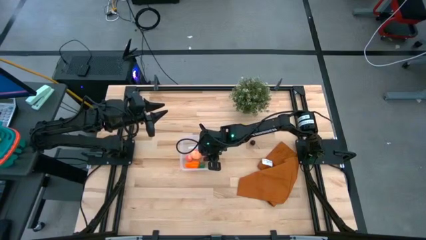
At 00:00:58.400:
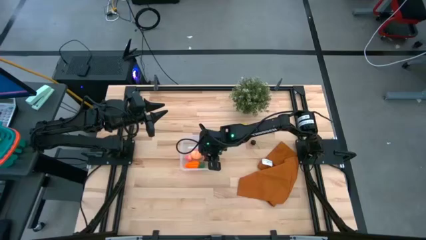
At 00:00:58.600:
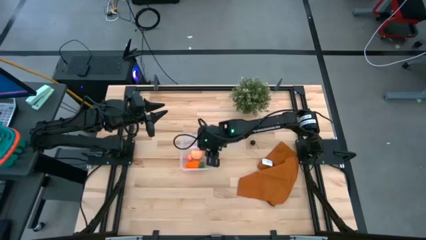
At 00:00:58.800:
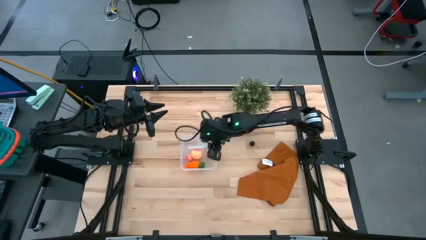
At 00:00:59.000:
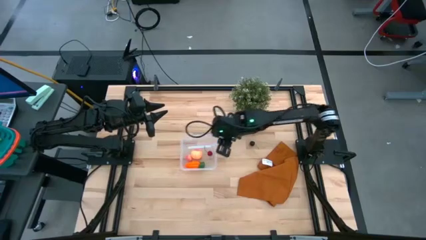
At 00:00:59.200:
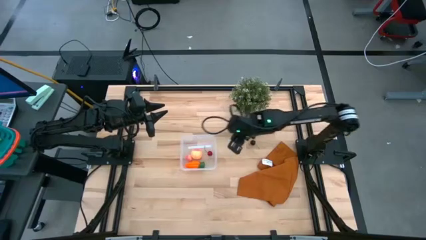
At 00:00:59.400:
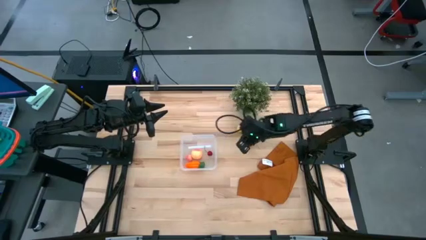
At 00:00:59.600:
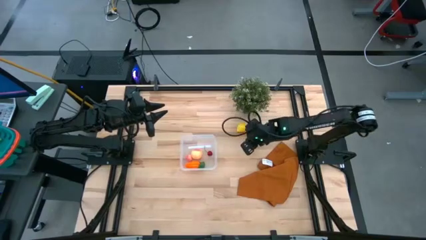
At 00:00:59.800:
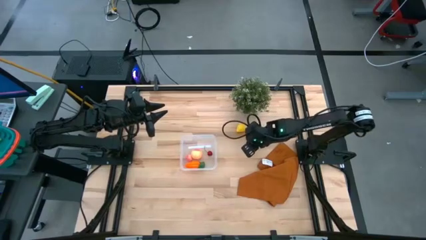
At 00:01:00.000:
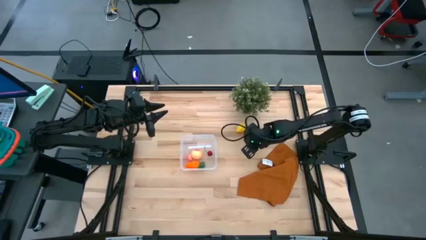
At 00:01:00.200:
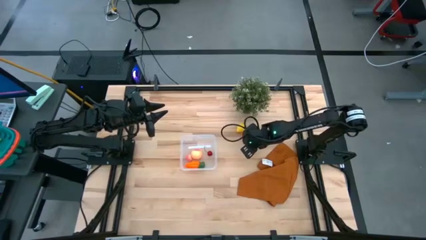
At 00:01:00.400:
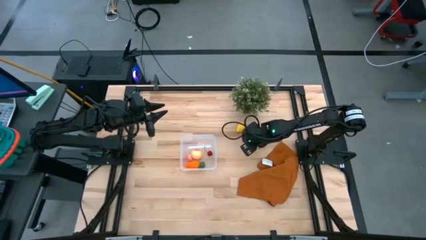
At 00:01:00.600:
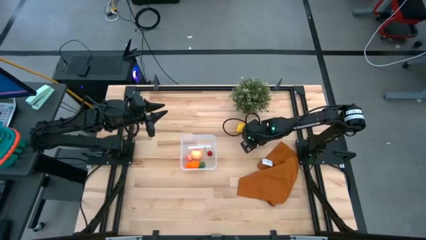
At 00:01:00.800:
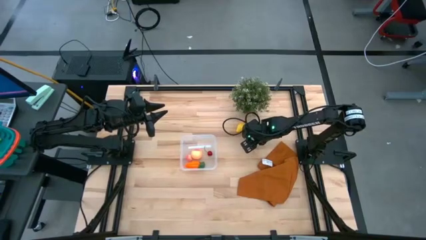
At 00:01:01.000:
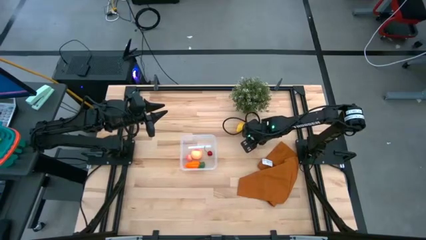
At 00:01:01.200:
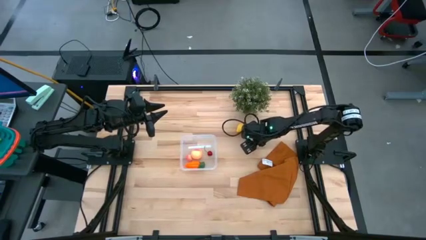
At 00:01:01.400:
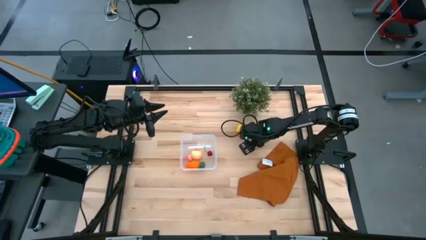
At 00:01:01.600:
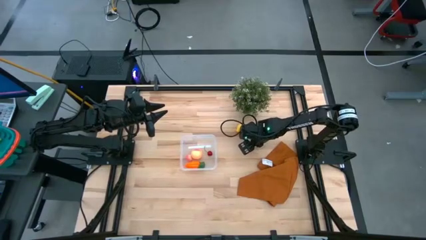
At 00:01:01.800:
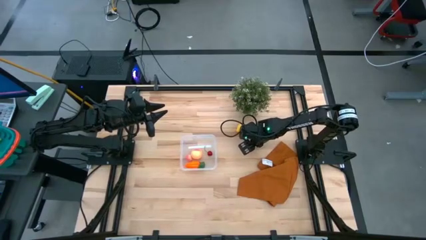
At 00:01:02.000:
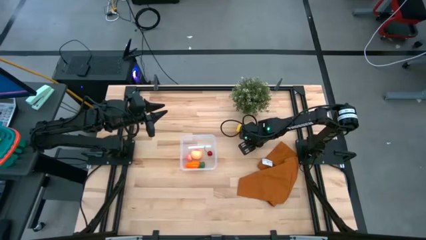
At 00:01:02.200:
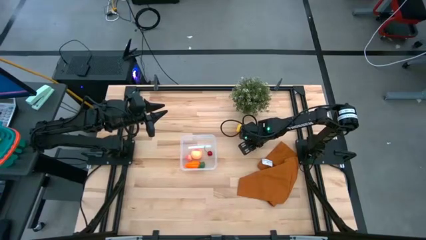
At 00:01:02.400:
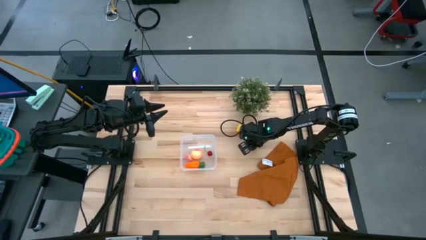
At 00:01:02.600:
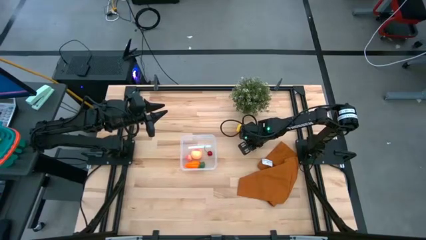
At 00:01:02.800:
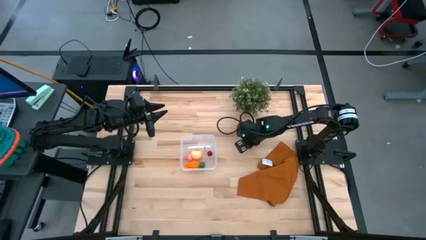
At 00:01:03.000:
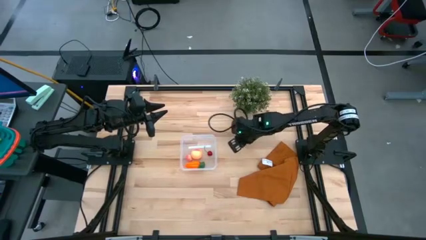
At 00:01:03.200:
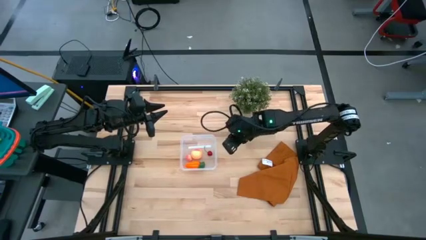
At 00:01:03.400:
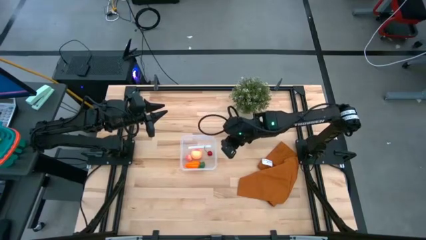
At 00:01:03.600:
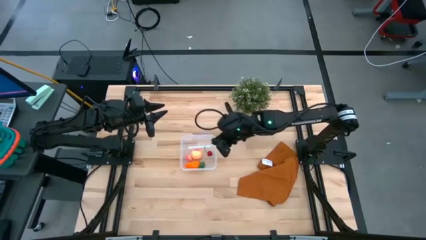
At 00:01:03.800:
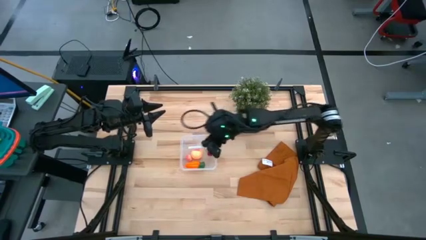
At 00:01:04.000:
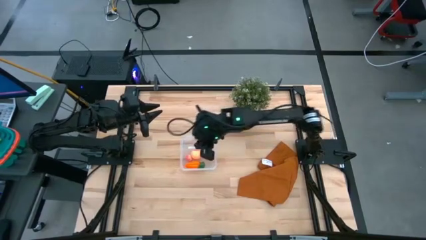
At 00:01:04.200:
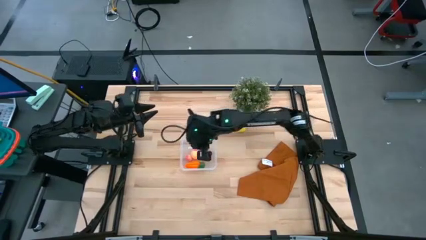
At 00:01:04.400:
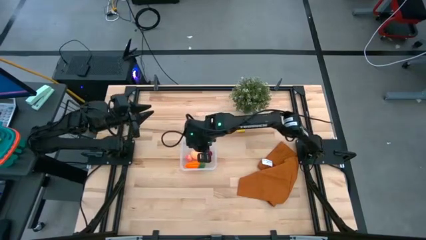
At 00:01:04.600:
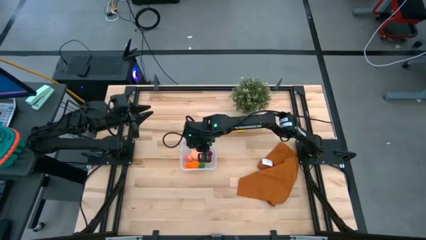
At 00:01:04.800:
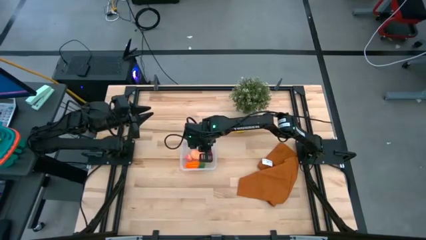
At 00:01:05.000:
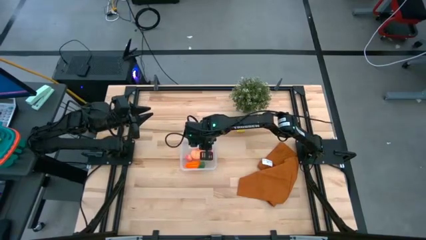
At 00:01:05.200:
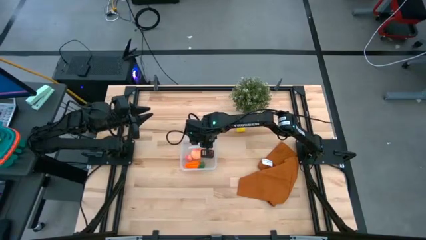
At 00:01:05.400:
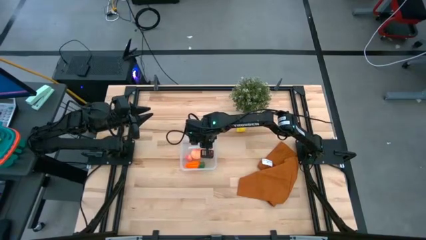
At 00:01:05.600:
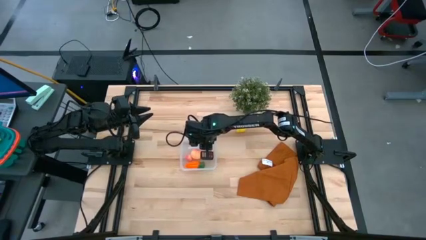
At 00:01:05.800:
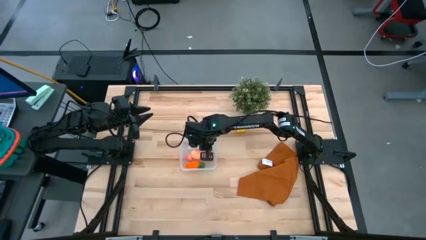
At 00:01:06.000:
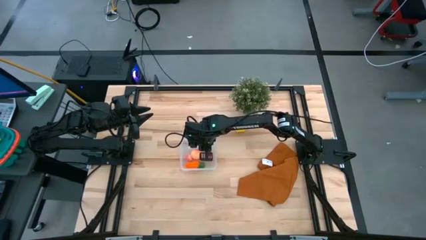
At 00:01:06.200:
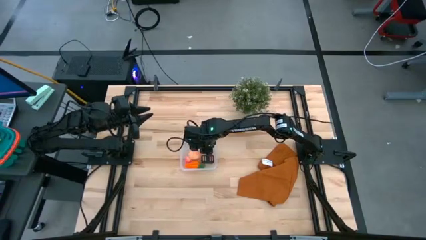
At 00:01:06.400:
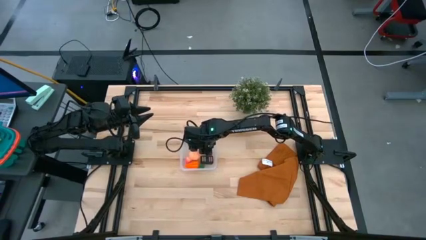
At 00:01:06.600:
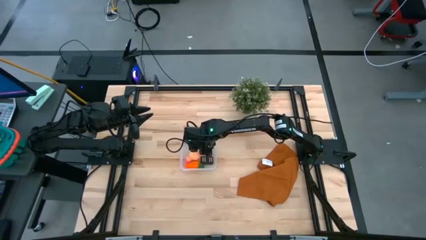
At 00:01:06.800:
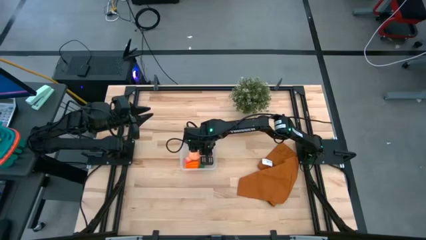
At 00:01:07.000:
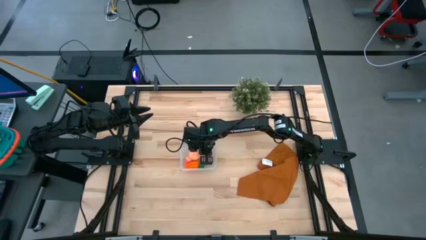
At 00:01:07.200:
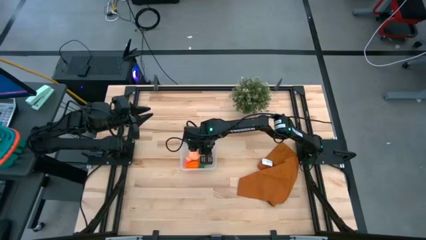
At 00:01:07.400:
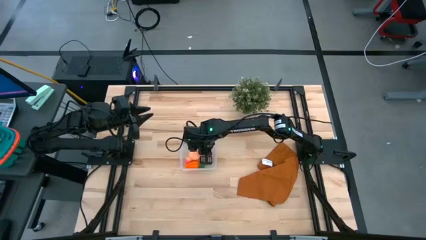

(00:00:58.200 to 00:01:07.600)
Task: Pick and placing Produce into tupperware
Put the black cherry into the transparent bin

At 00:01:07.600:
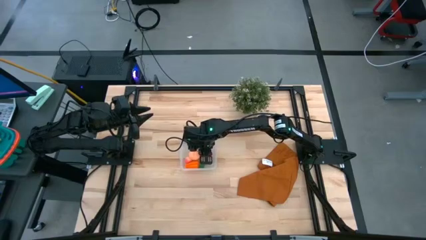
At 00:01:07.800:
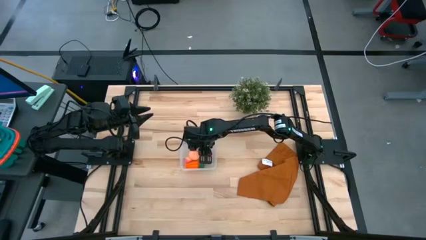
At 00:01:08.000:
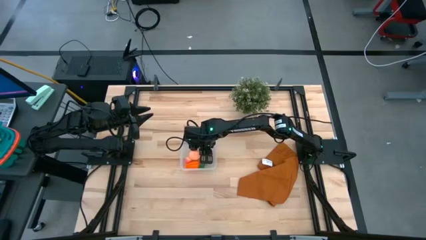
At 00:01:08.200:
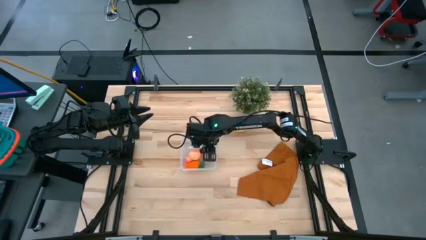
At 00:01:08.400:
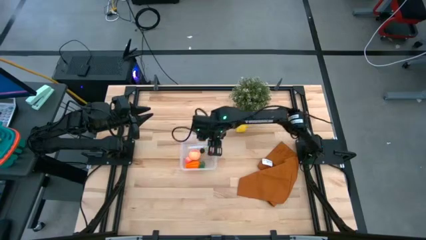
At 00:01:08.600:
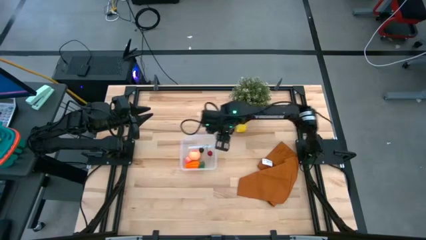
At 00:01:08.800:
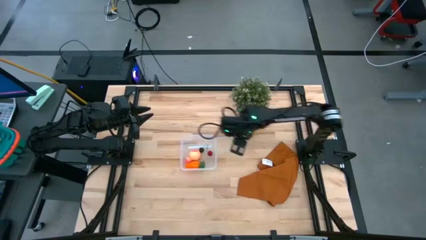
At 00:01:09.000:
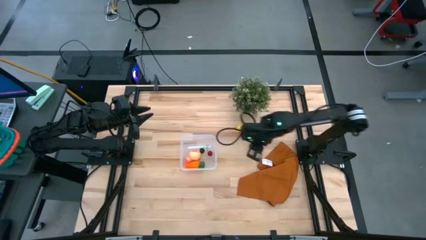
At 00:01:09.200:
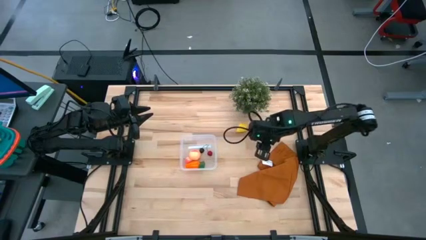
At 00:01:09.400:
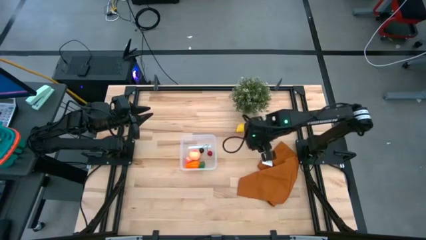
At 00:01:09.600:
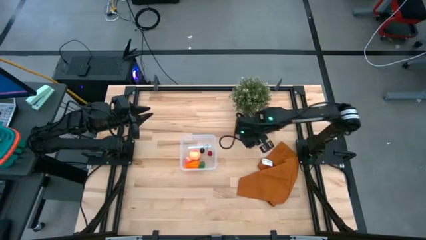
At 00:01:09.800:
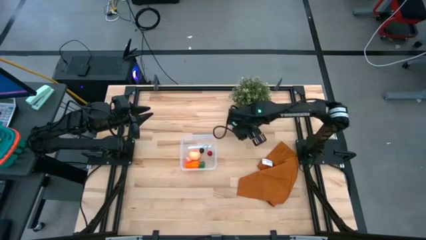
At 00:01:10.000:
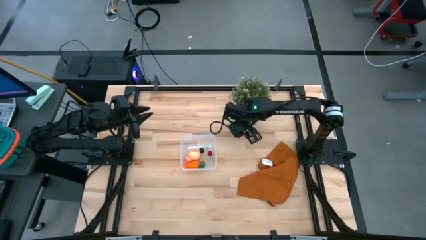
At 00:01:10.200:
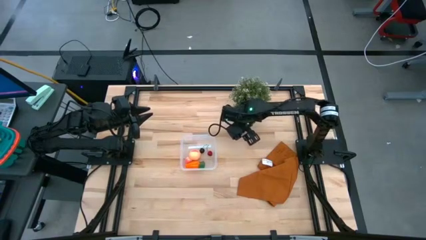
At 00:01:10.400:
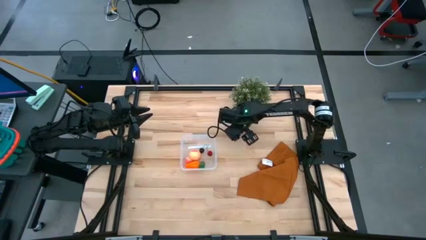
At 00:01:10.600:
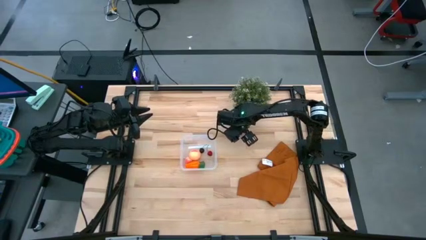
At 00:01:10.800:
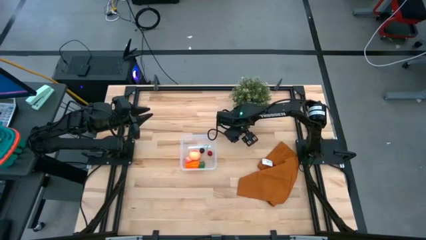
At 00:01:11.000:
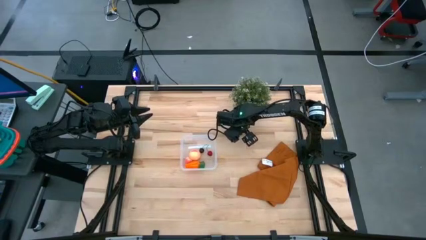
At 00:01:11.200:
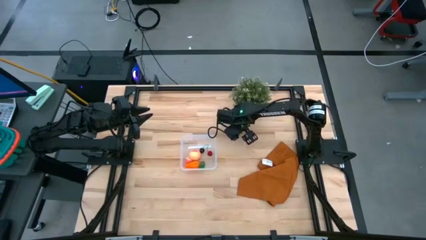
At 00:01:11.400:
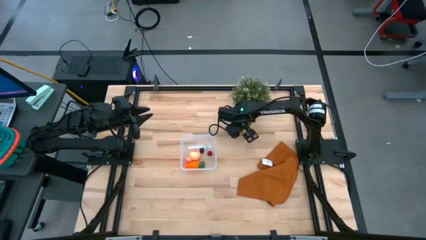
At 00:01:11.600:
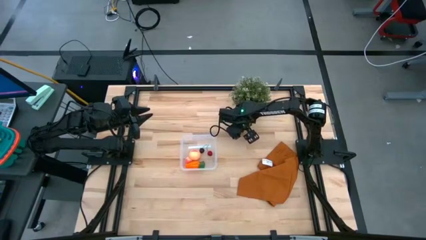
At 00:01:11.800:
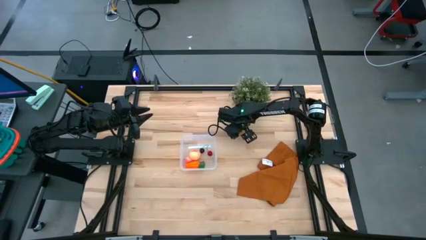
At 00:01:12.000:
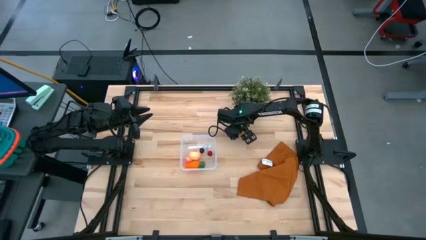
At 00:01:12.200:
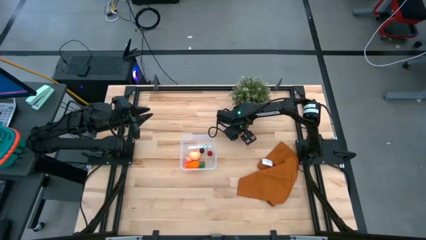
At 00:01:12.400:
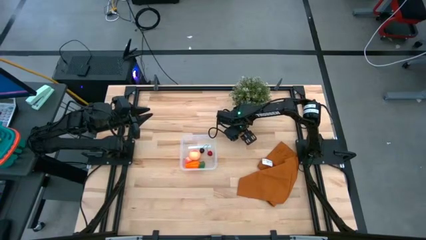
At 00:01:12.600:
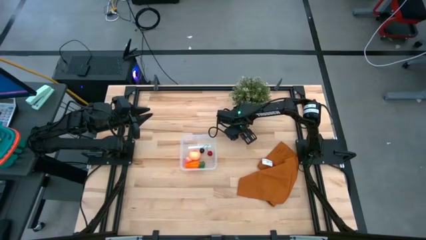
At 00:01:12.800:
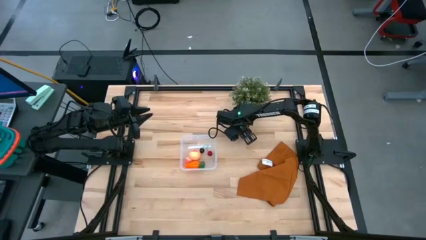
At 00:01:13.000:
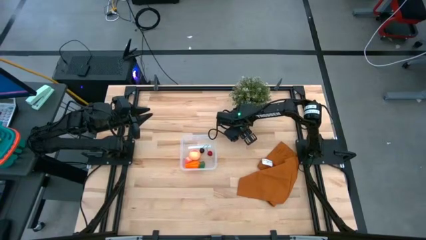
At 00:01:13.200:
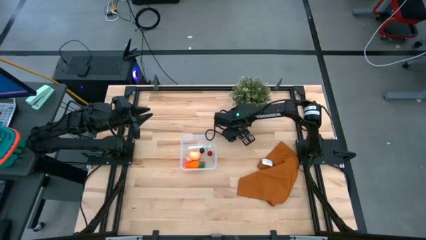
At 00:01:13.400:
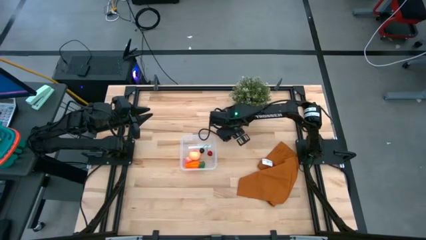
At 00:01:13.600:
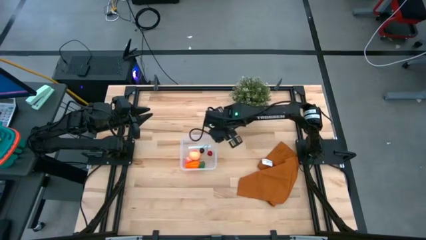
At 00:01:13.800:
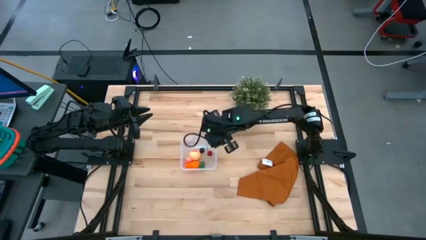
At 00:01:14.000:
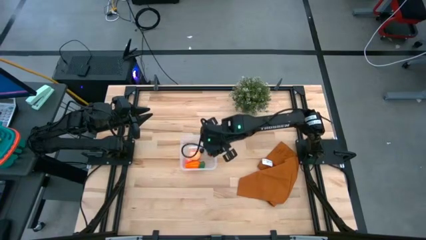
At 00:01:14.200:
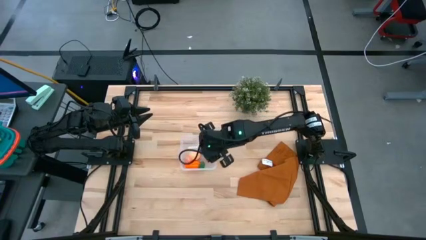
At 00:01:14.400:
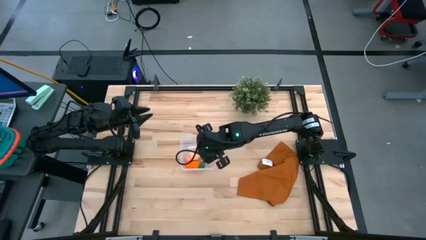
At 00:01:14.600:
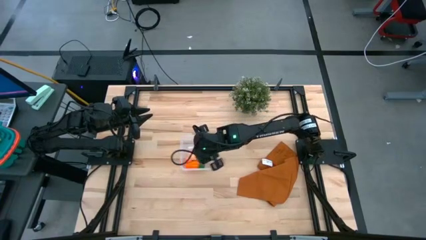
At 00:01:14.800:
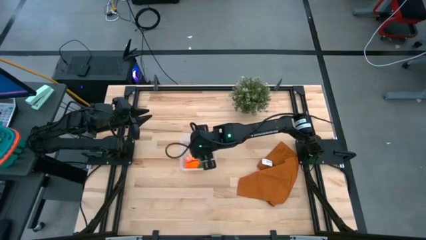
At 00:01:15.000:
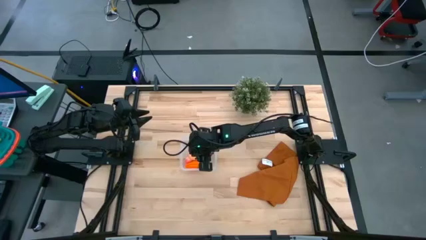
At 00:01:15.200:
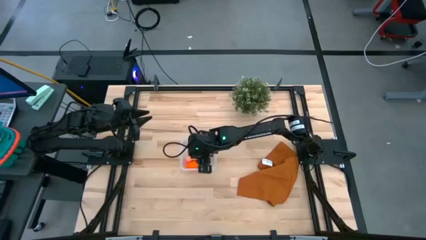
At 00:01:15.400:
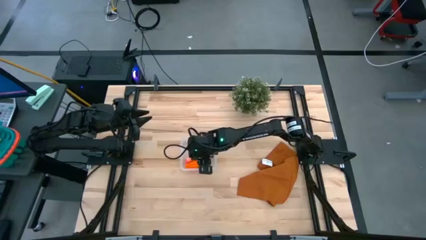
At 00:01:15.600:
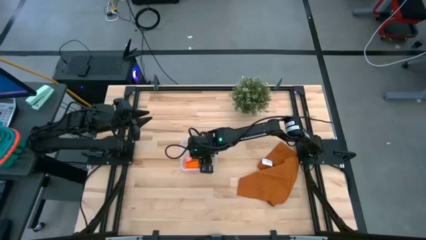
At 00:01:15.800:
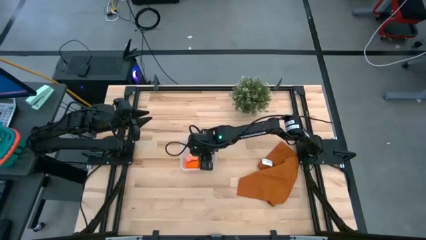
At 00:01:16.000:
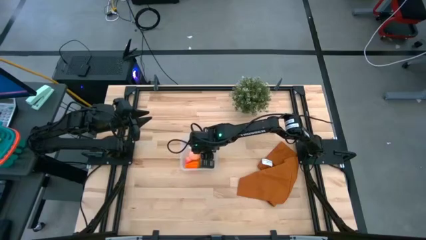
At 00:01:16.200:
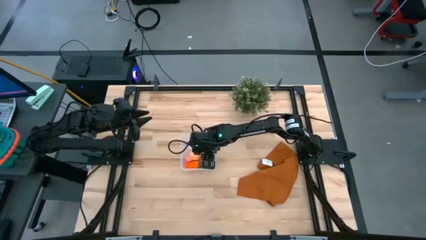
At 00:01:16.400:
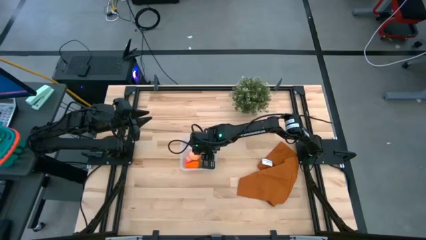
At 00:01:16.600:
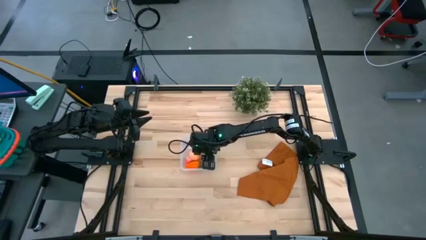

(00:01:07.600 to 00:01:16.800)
Put the yellow lemon into the transparent bin
